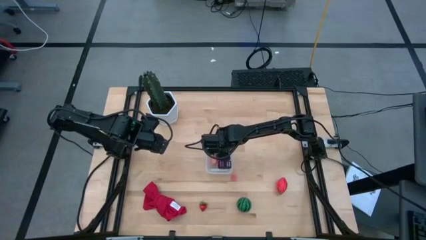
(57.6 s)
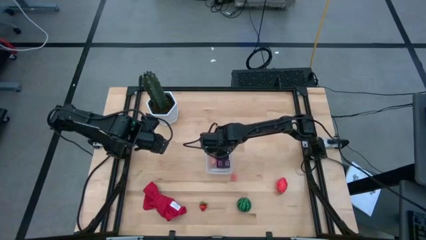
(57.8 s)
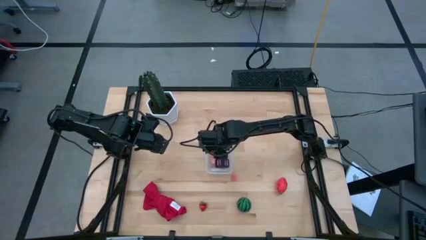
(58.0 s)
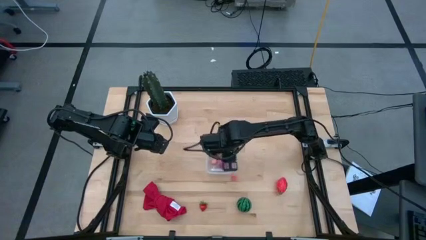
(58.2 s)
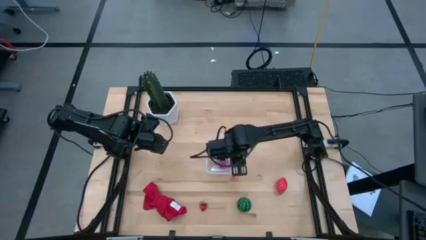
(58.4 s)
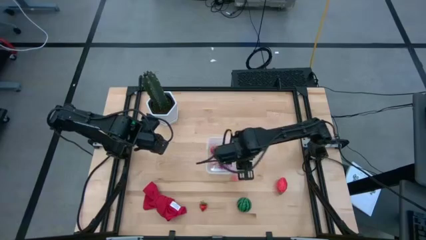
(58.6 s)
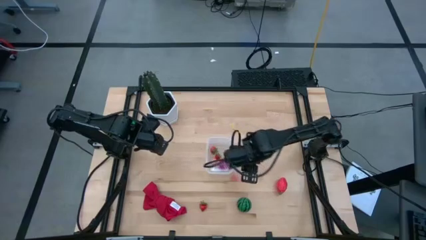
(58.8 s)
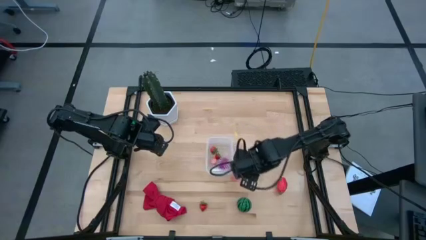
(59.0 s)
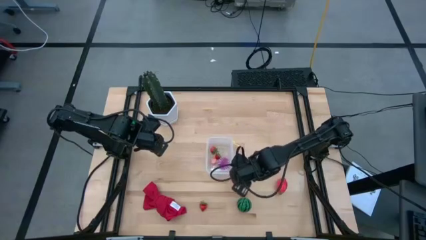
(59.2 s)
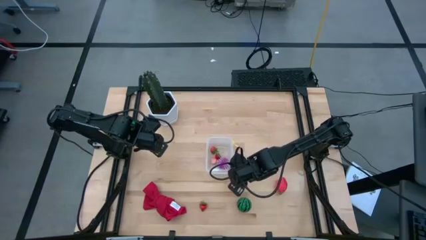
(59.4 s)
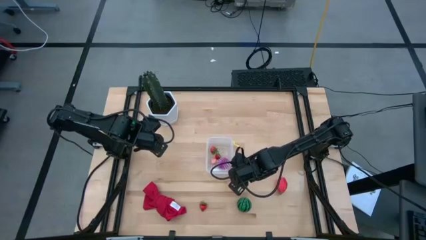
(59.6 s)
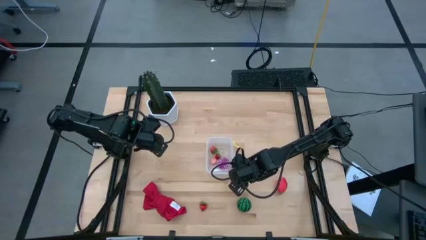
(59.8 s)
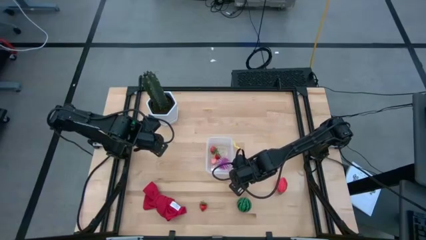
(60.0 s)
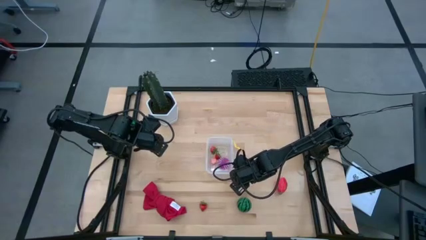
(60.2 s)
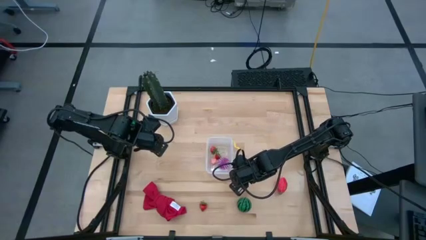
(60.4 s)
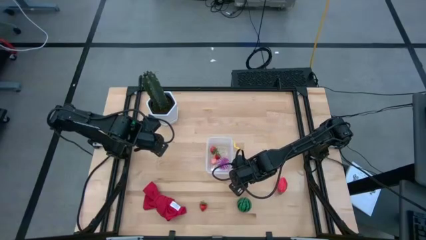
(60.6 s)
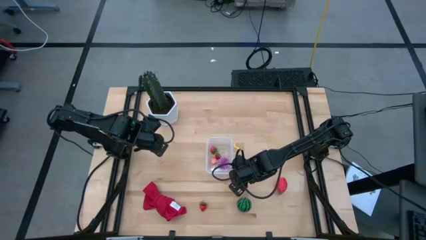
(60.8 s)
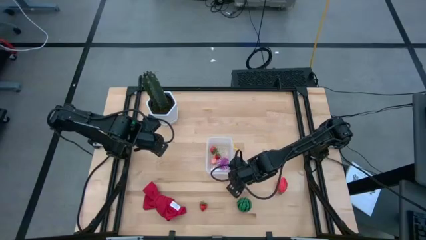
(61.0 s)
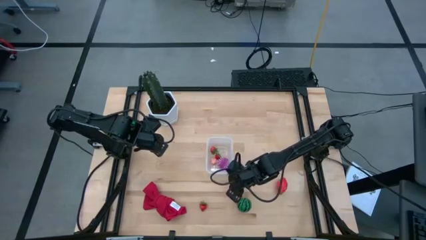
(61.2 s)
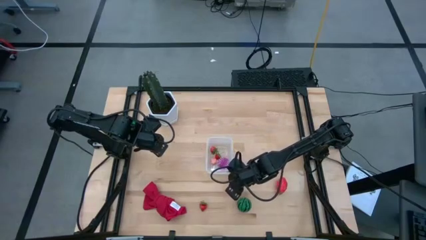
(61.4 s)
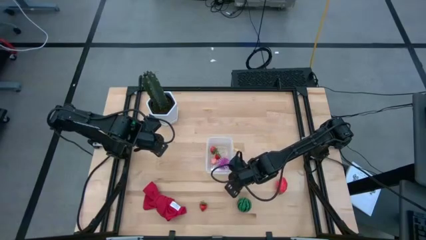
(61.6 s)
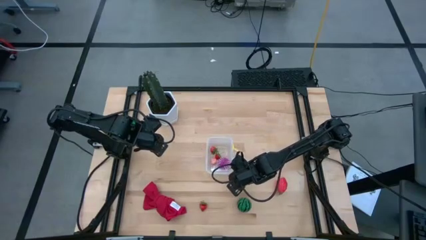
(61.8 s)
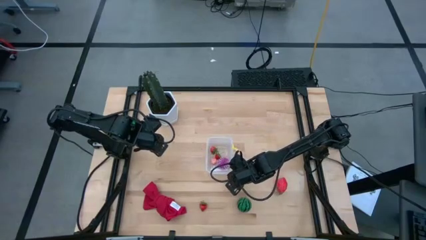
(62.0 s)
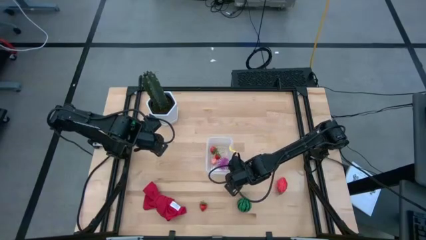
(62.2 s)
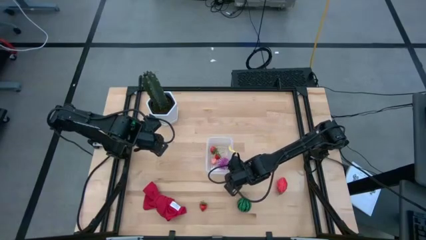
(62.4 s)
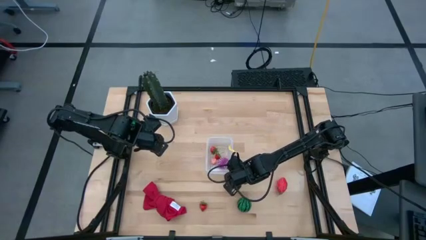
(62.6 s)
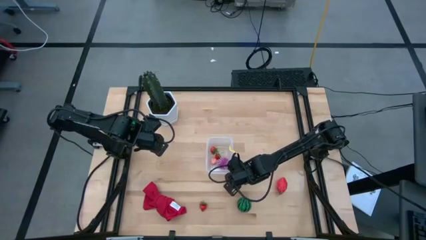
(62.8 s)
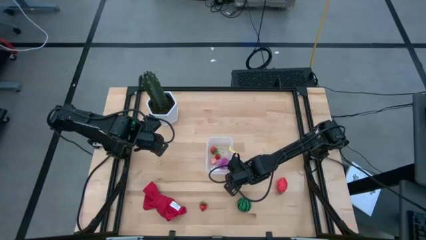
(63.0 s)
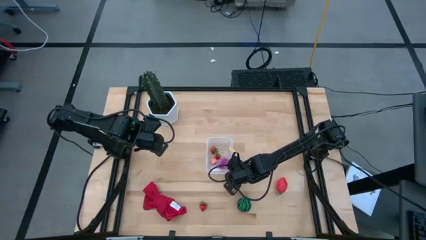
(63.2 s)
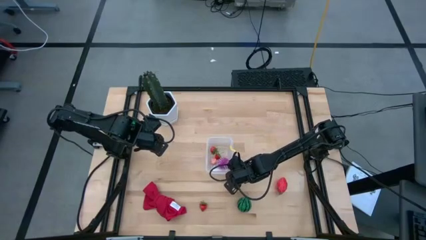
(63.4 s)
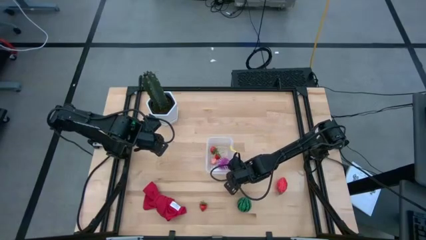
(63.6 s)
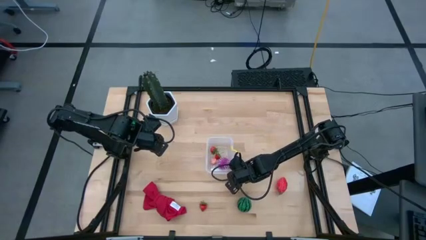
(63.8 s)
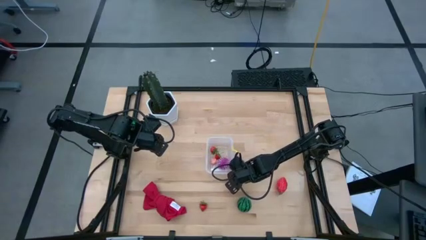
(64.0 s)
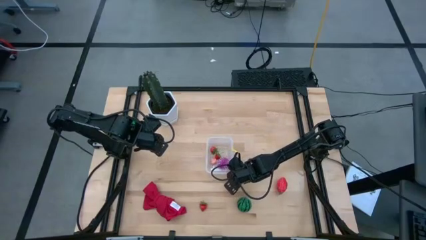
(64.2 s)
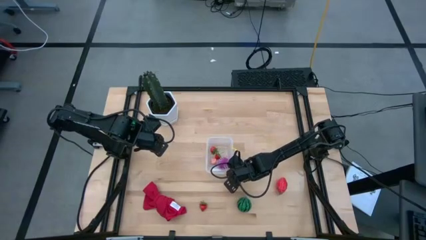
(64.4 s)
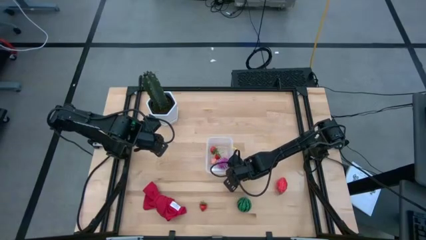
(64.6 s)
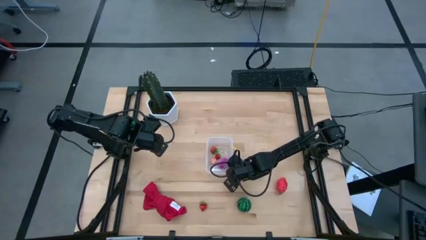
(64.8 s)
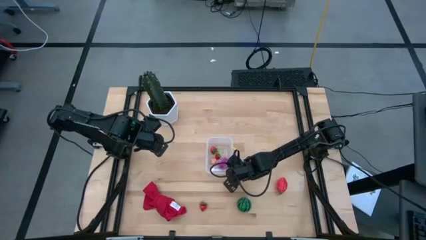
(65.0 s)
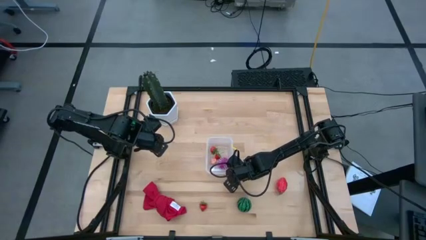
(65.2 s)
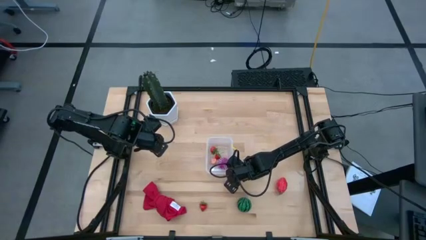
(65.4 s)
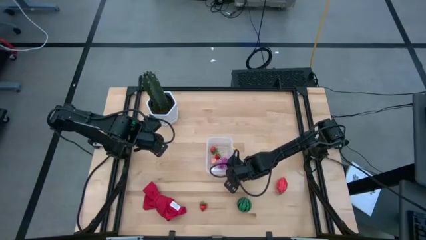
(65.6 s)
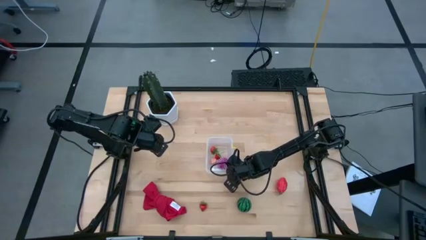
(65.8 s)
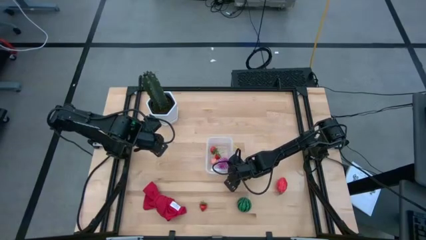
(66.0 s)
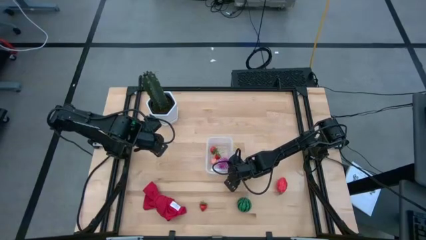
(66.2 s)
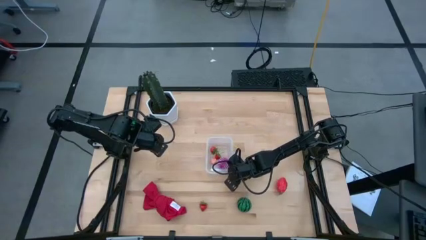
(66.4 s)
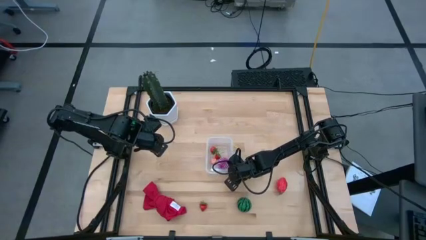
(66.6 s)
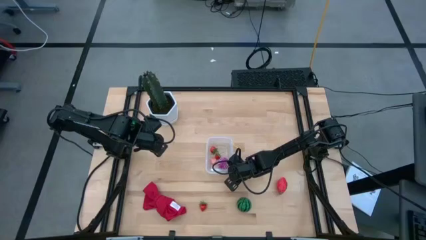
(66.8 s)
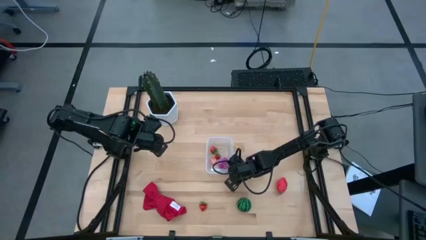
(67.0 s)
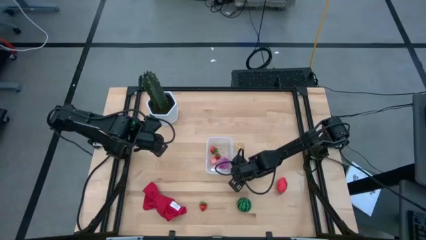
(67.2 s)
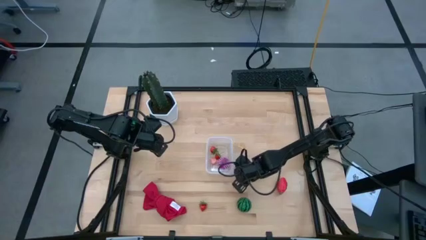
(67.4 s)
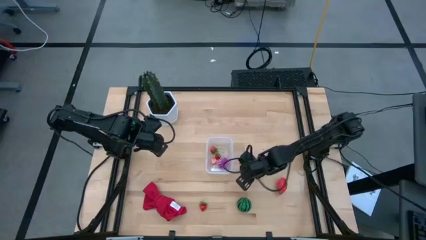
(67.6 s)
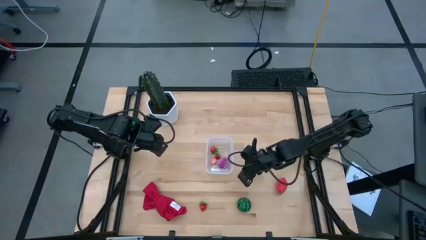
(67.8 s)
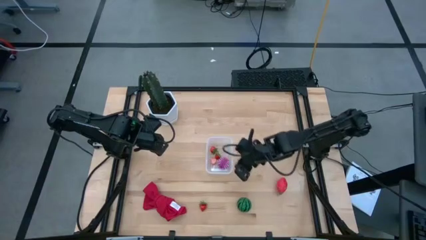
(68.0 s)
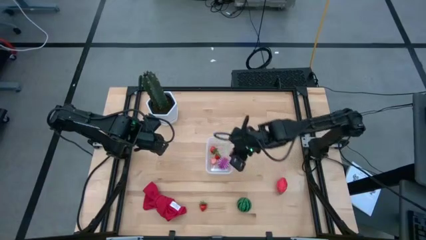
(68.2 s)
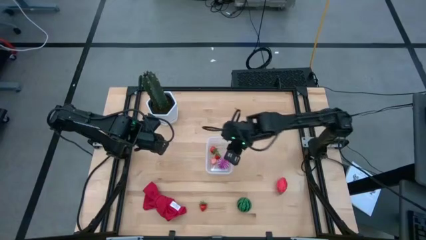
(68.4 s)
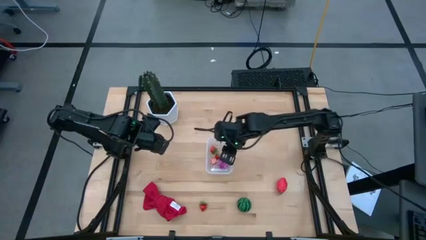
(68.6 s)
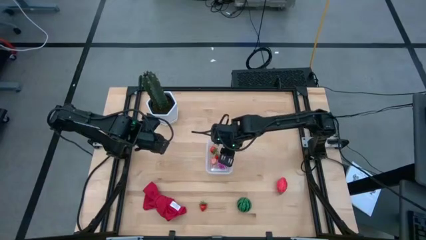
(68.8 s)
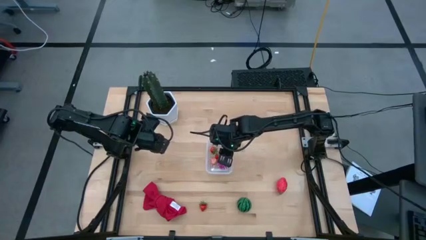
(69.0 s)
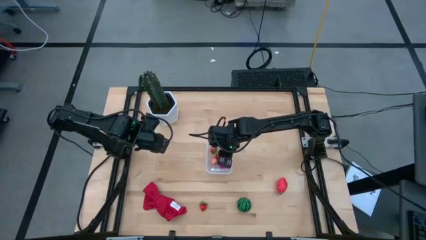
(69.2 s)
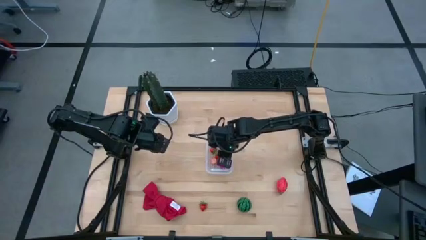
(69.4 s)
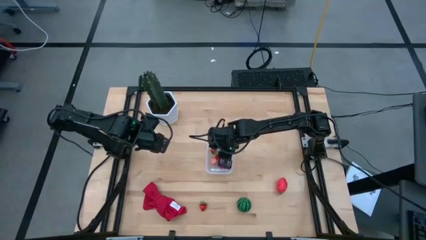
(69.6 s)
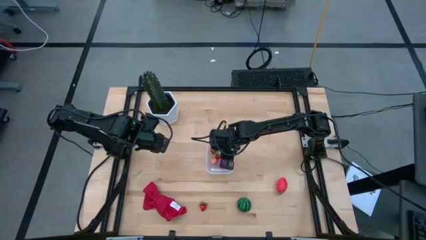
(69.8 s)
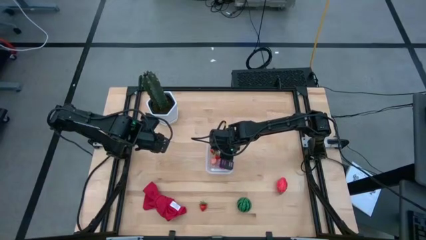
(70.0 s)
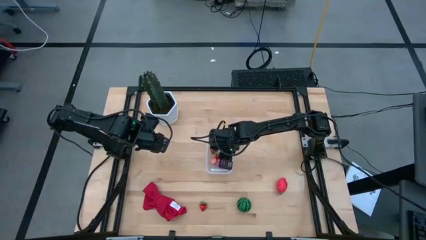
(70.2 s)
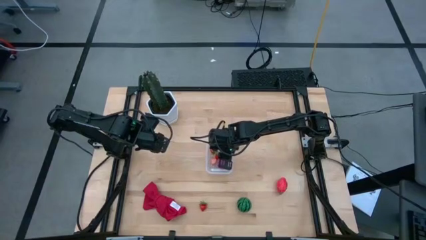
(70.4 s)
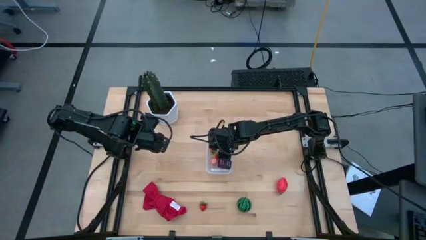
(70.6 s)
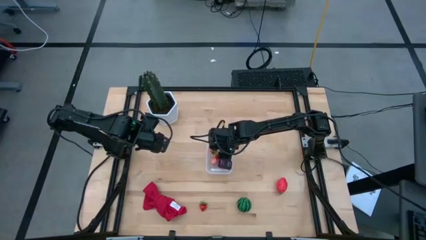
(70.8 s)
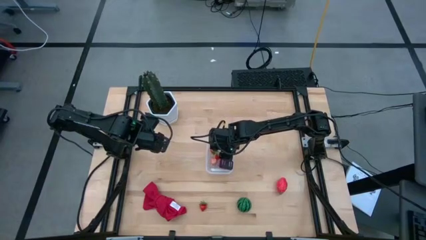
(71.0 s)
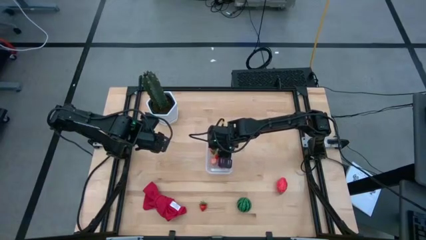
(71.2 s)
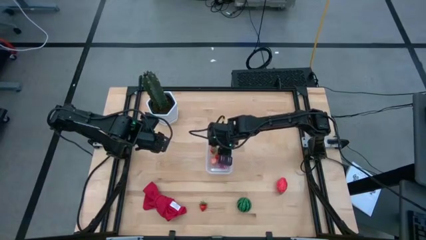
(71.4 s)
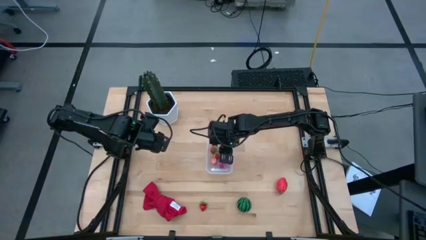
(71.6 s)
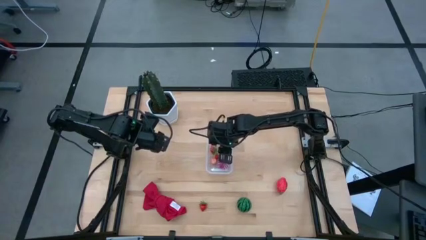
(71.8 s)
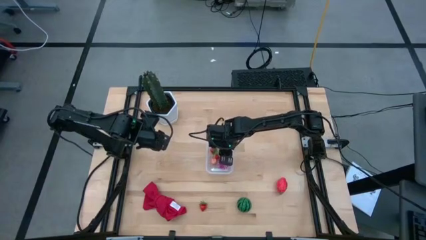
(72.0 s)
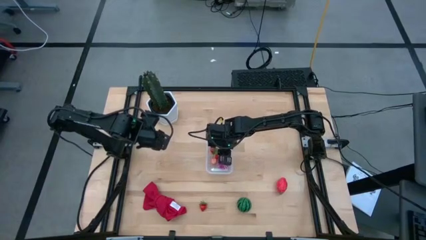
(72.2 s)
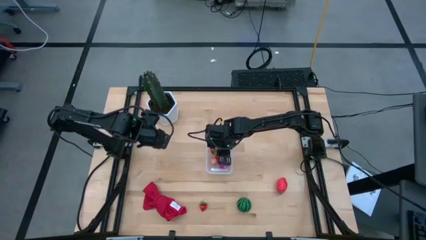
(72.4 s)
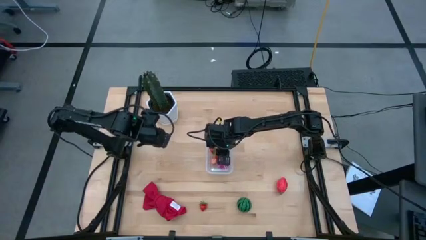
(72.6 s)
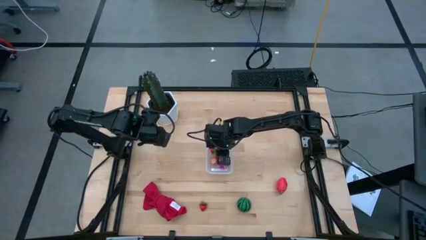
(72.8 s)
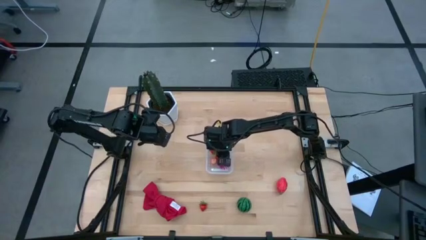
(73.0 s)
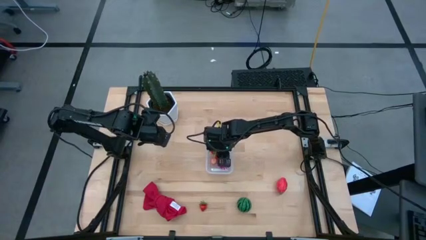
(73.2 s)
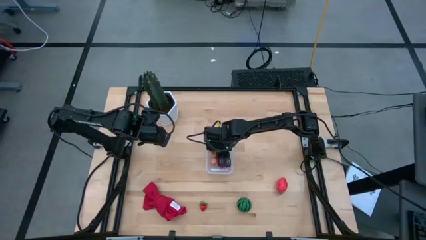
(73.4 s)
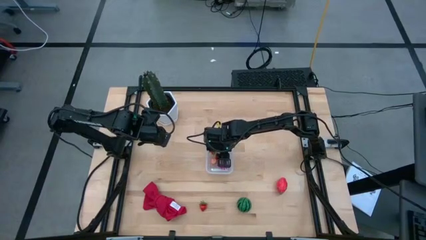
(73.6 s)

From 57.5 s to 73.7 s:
Task: Pick and placing Produce into tupperware
Put the pink peach into the transparent bin

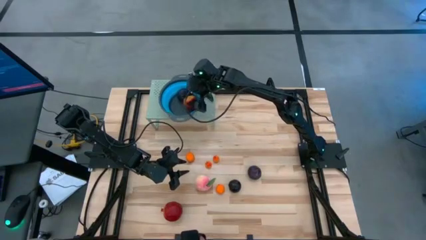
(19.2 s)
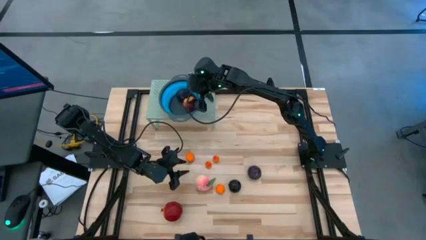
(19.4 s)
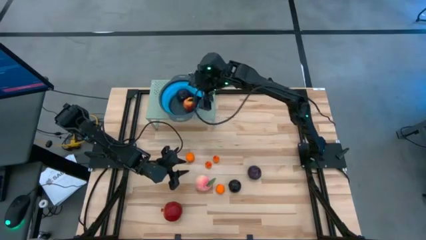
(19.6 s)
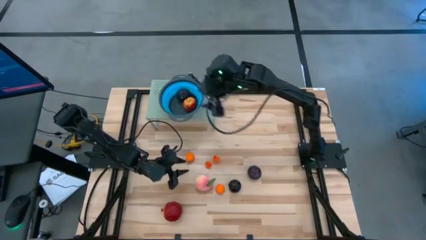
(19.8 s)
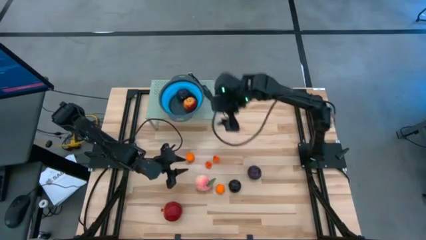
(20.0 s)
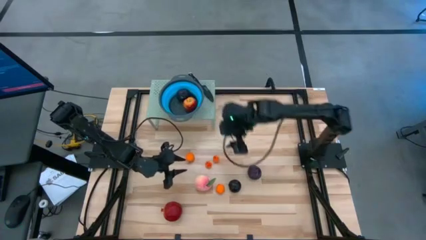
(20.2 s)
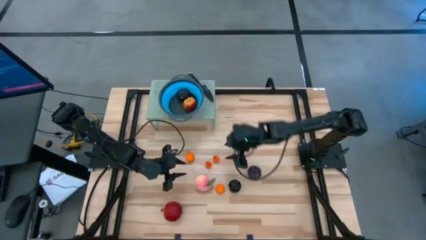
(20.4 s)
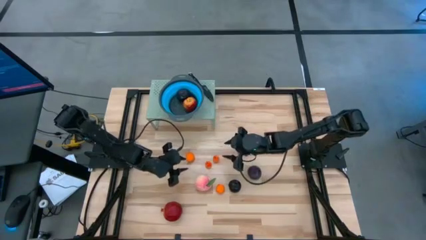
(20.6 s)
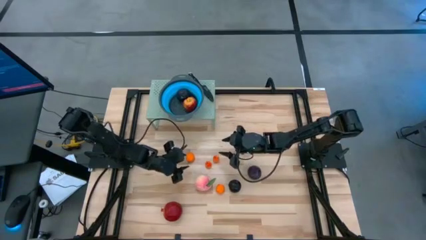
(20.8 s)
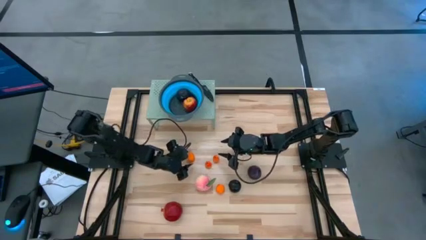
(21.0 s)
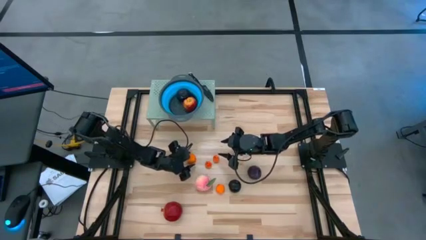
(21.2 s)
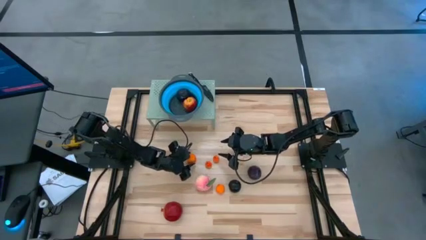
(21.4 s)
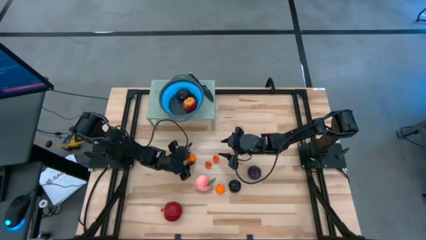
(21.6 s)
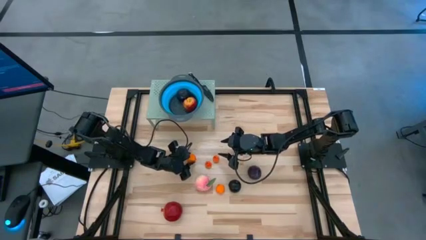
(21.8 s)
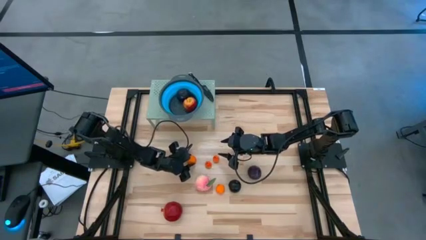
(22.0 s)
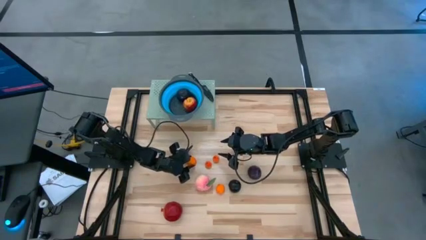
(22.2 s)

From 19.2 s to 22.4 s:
Task: Pick & Place Fruit
Put the top orange into the blue strainer bowl on the shelf
